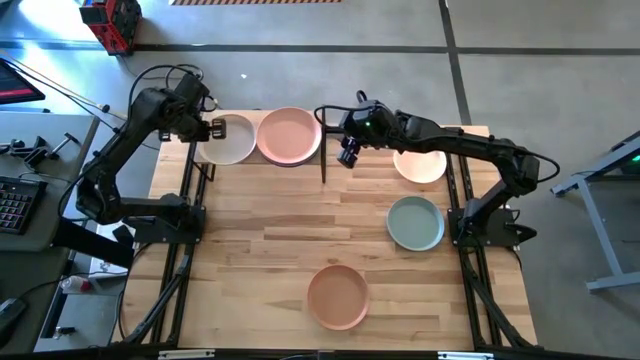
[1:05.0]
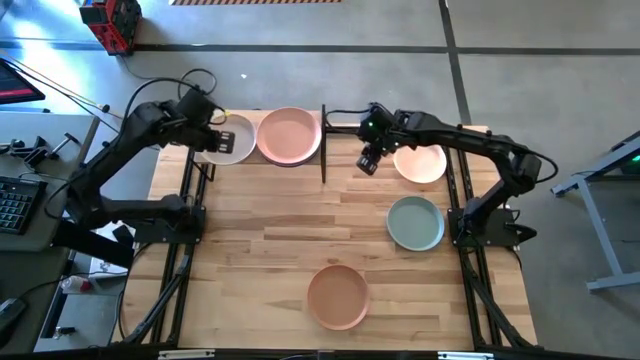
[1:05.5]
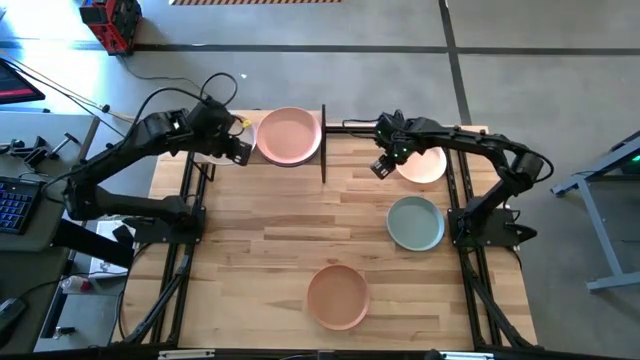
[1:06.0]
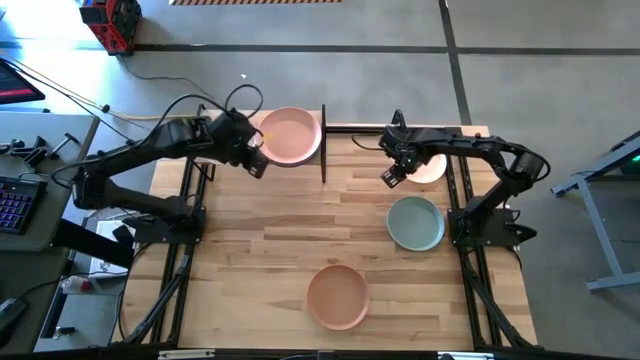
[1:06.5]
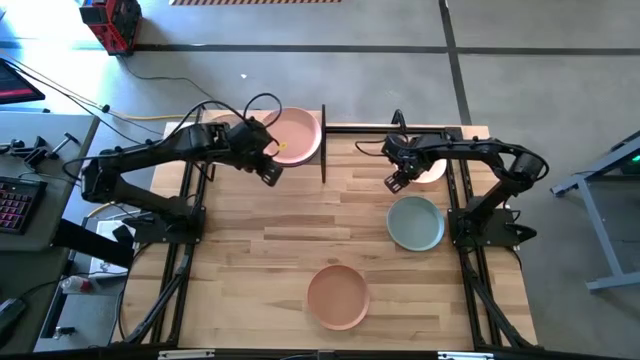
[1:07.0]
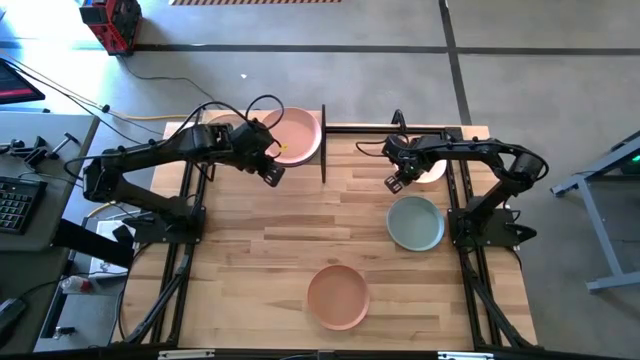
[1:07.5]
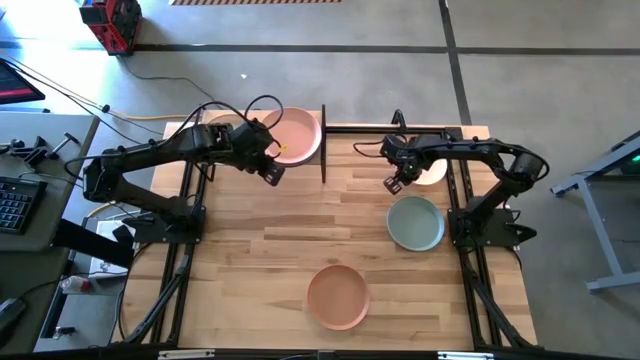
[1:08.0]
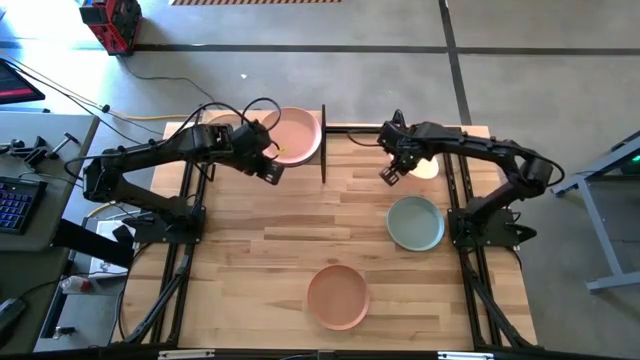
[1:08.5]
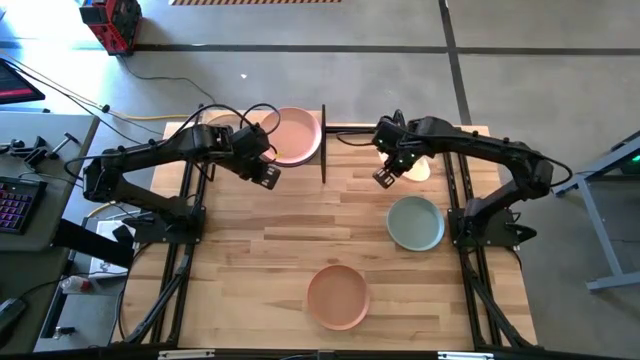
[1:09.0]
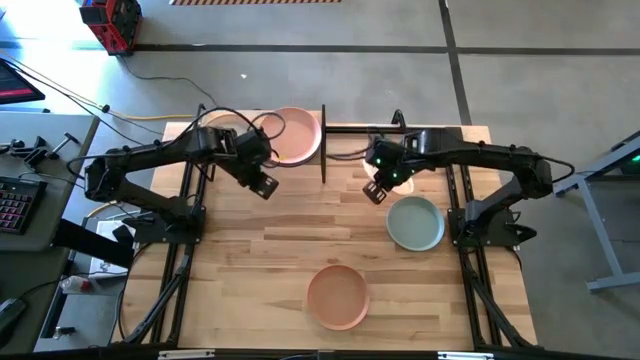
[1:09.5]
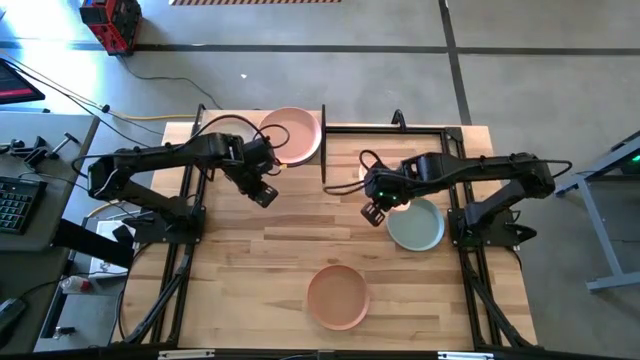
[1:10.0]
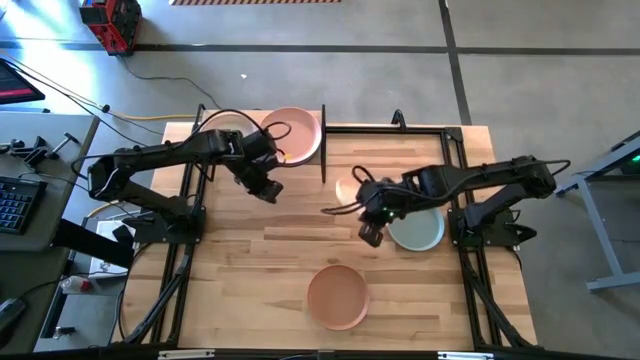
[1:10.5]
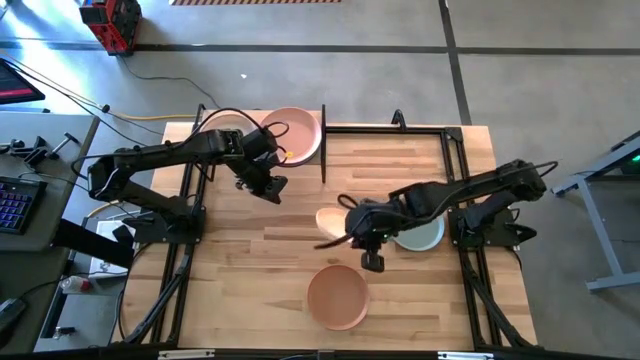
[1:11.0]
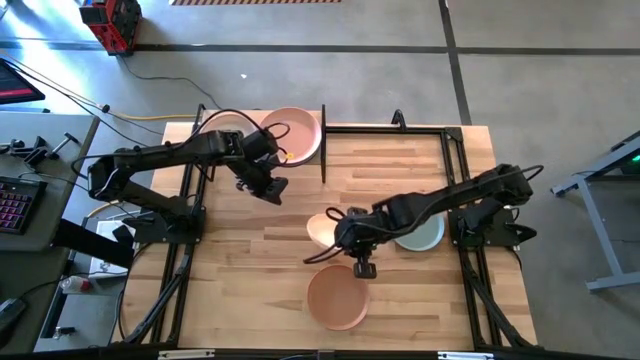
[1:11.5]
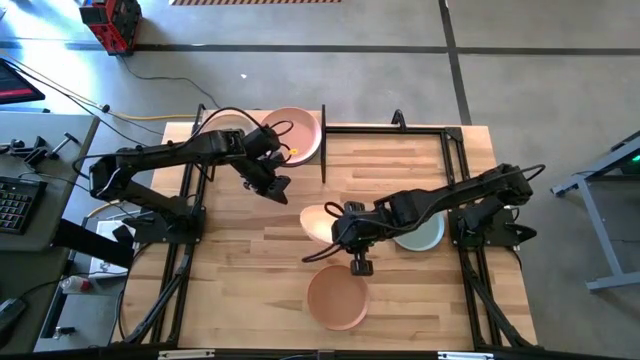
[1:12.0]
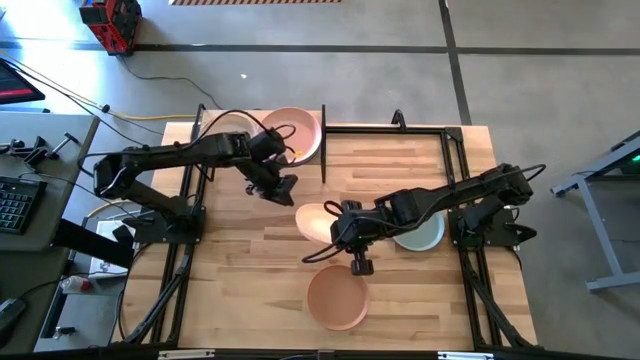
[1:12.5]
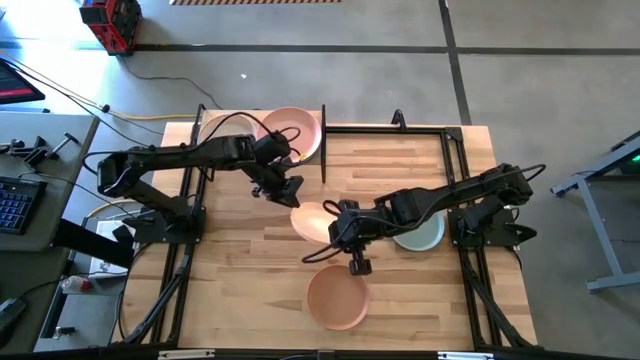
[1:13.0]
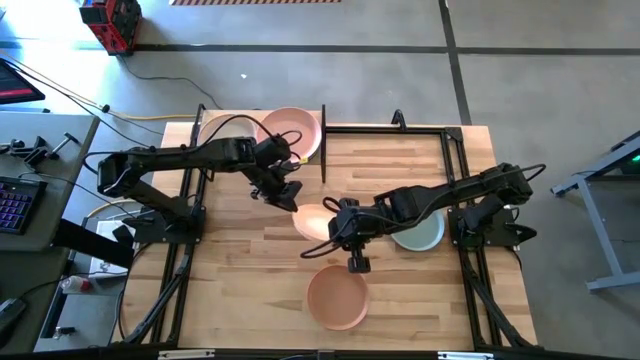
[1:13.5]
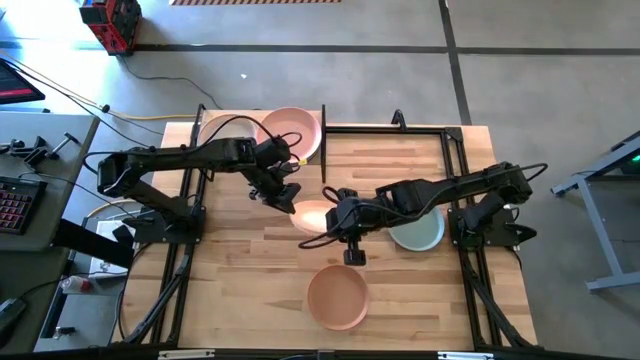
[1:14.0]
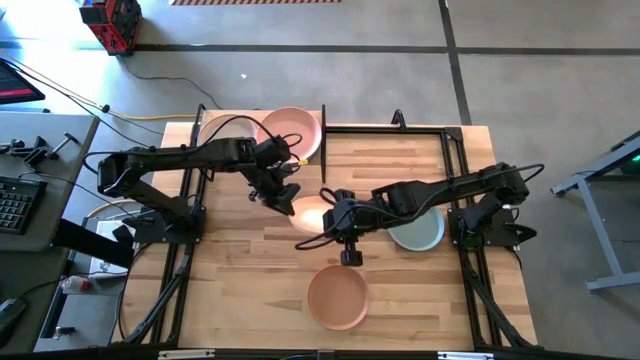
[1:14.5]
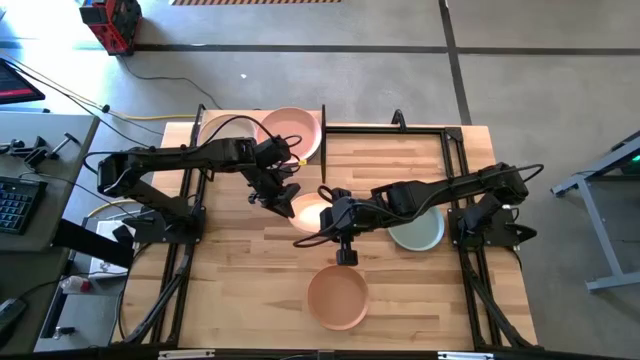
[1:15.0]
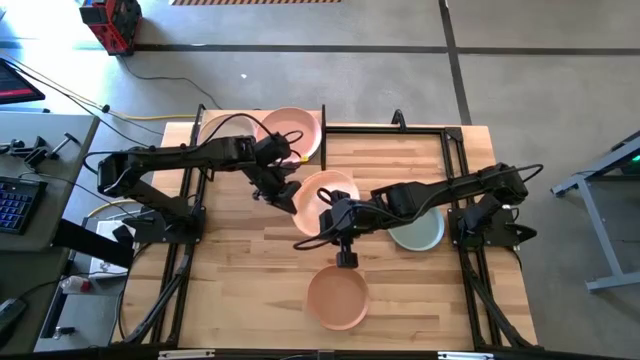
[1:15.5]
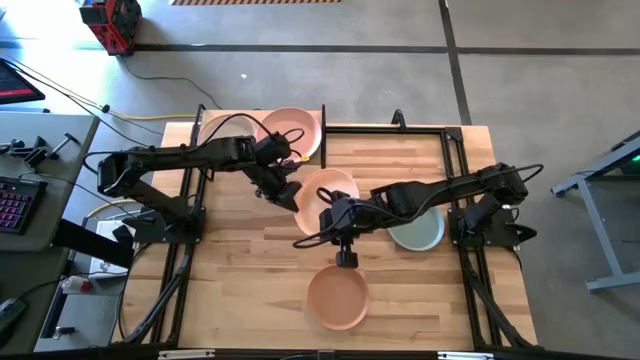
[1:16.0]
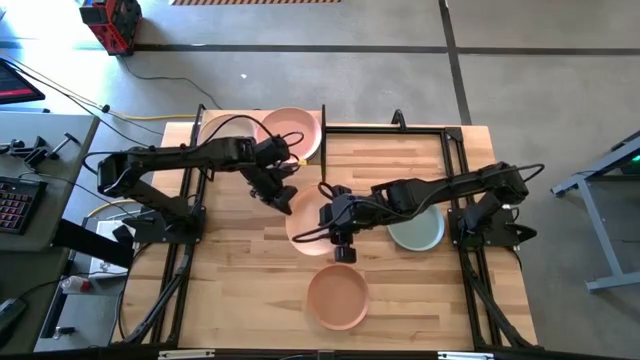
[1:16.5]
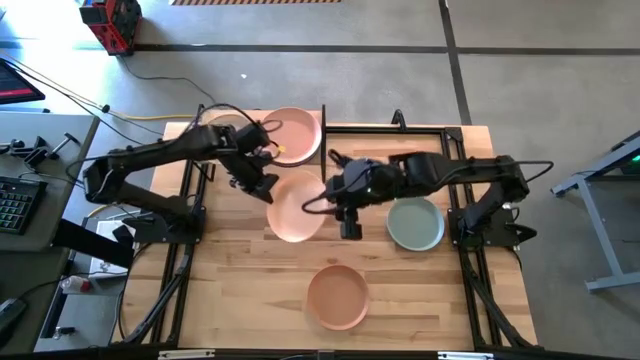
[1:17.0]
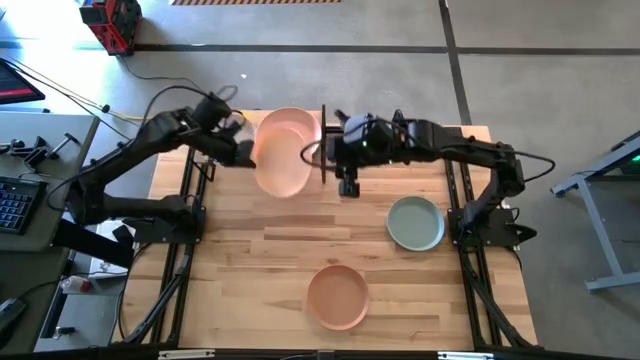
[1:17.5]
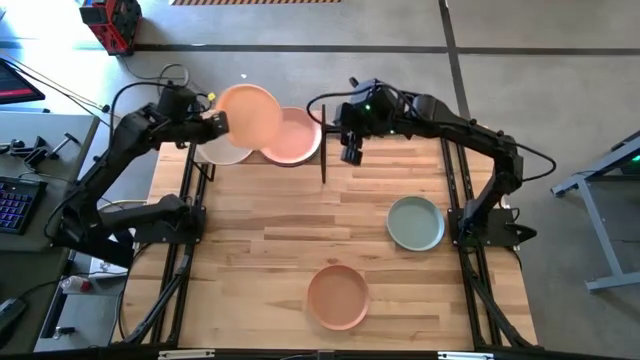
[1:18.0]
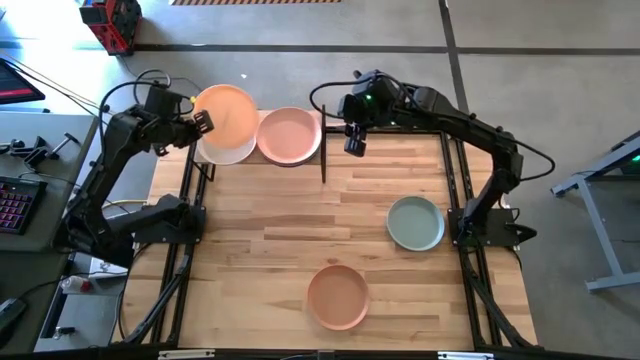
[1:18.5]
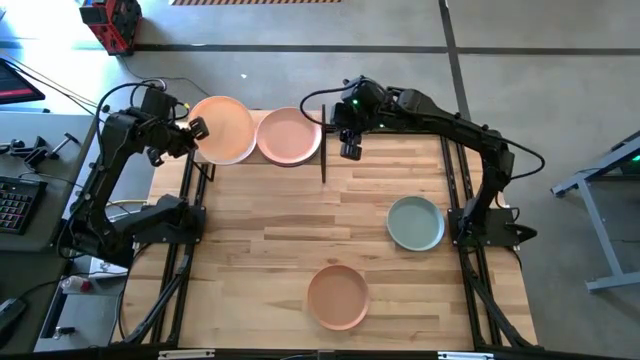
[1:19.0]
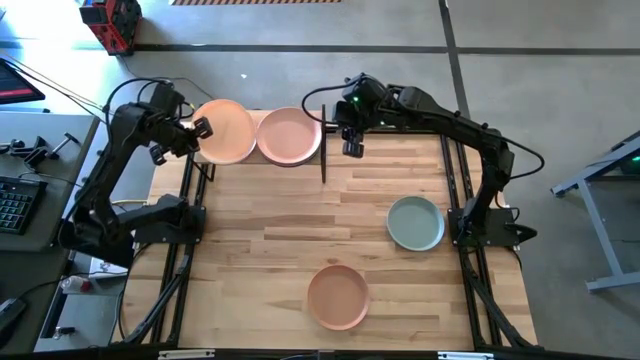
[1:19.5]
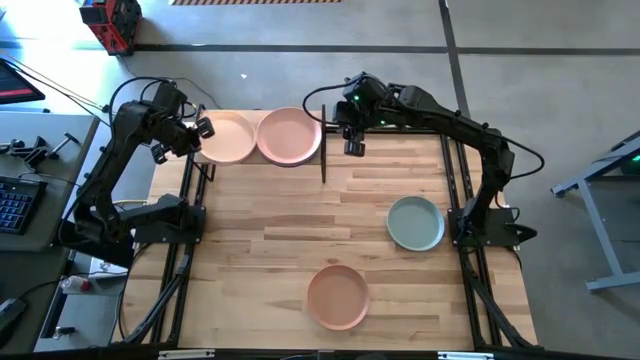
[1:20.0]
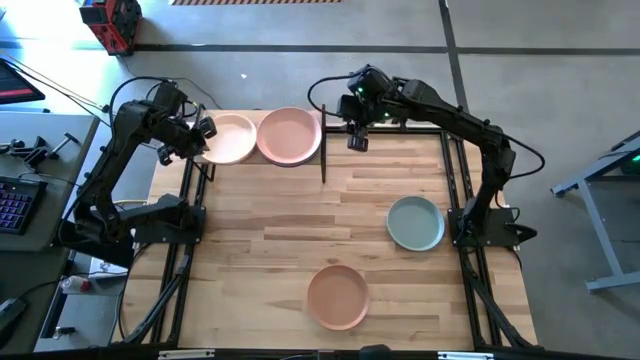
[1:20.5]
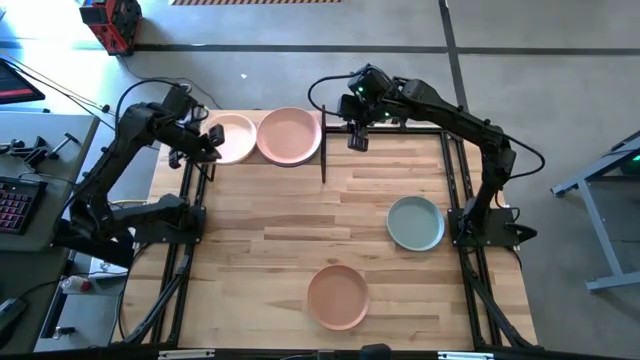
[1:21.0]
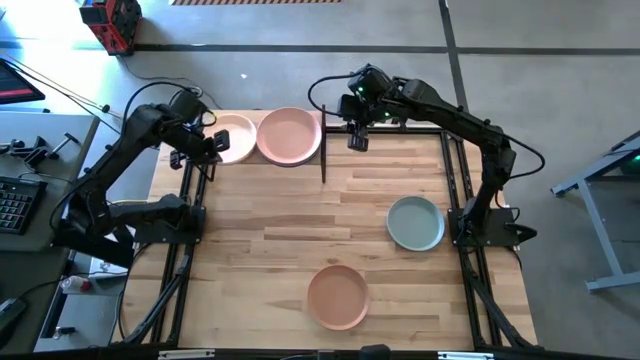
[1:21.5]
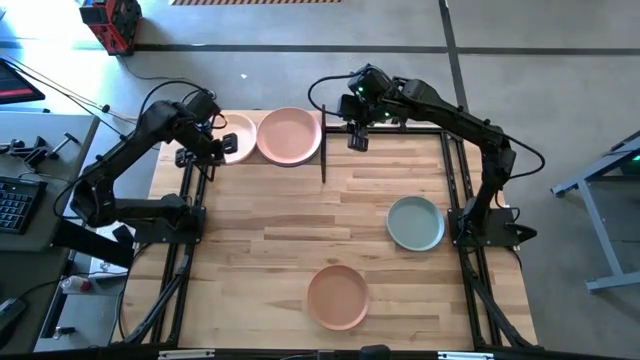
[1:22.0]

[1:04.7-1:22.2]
Task: Place and stack plates onto a shelf
Stack the white plate on top of the cream plate on the shelf

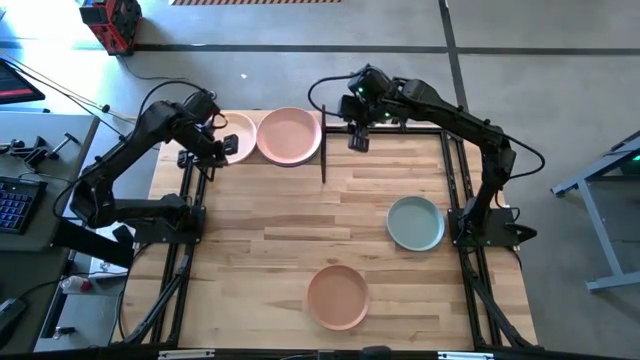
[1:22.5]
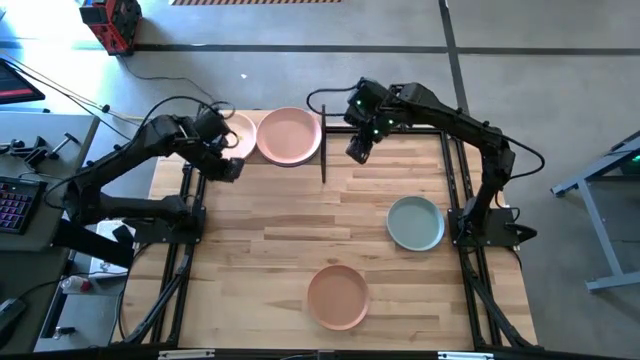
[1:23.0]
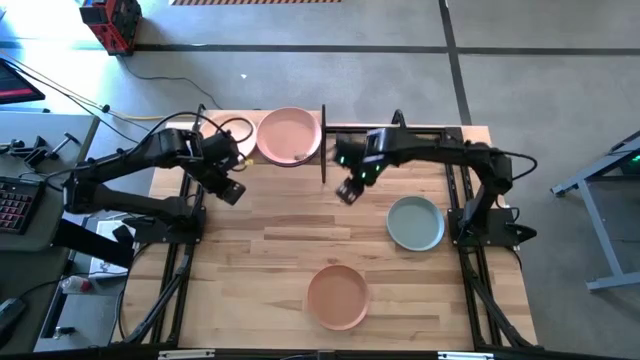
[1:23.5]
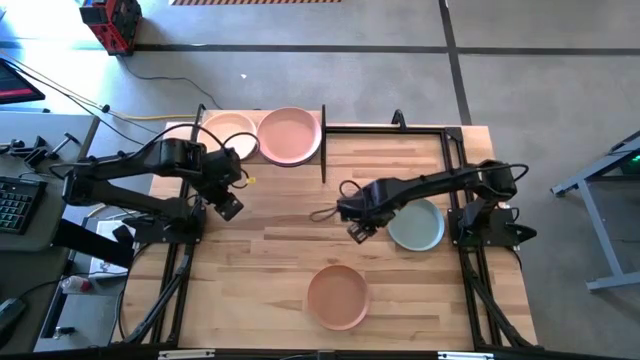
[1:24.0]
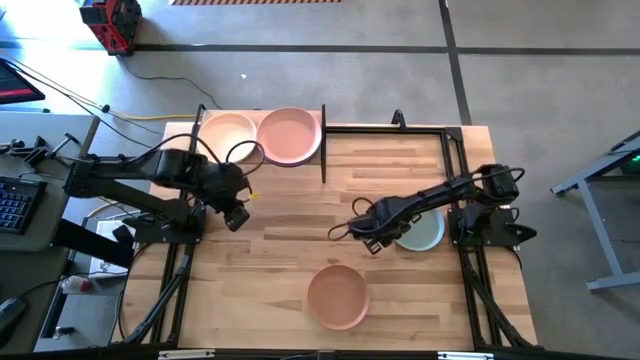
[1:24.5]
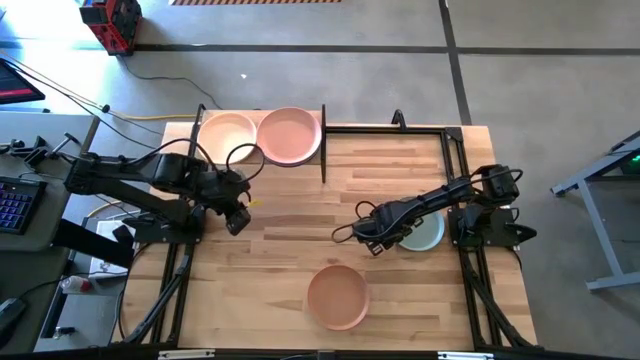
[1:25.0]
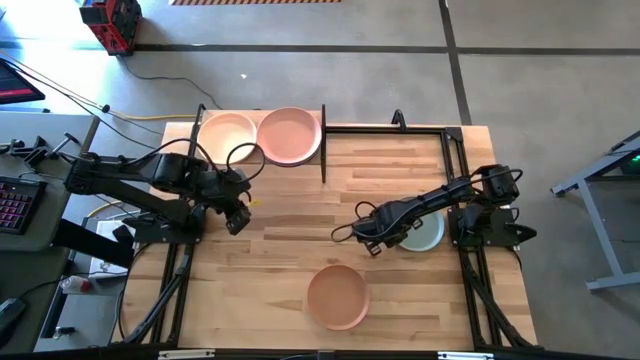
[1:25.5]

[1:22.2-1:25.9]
Stack the light blue plate on top of the white plate on the shelf
